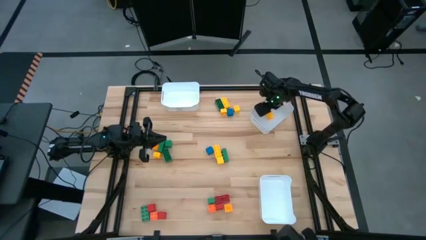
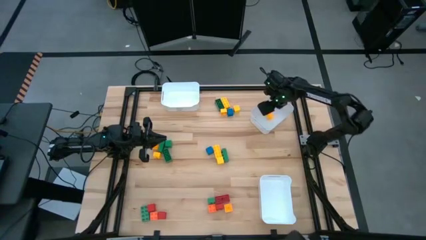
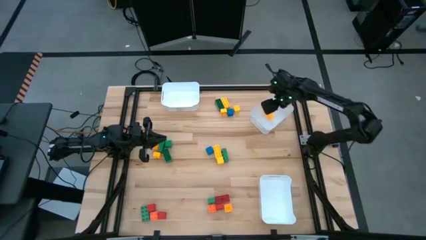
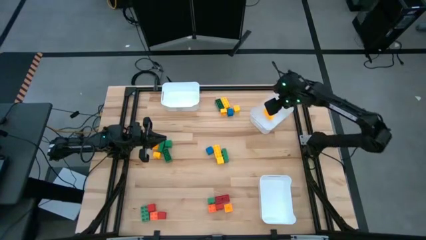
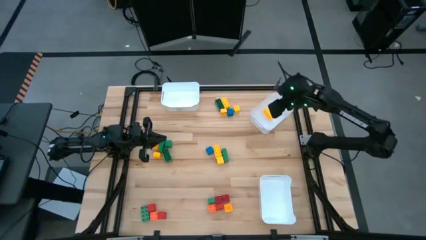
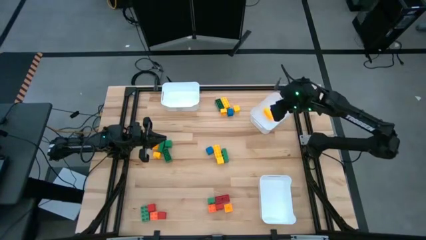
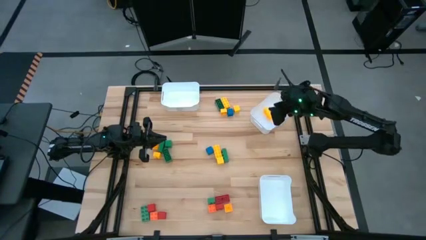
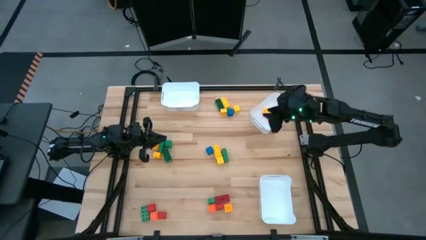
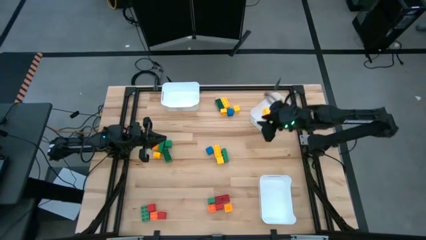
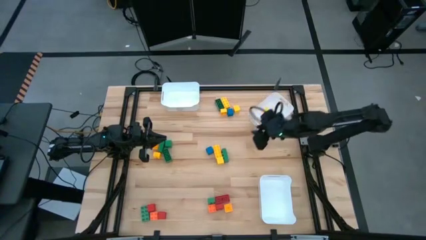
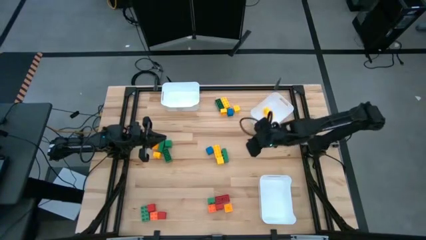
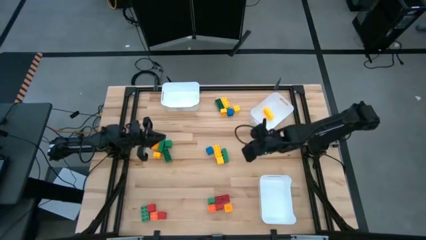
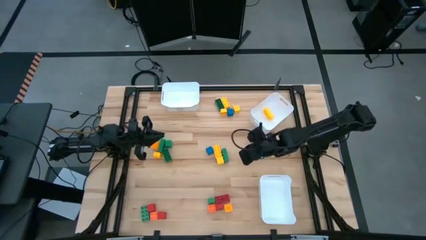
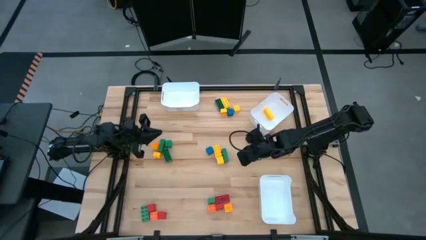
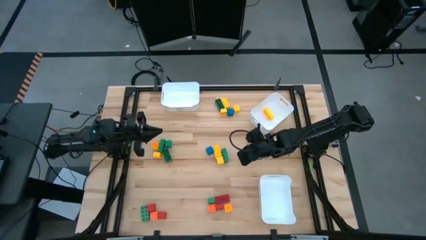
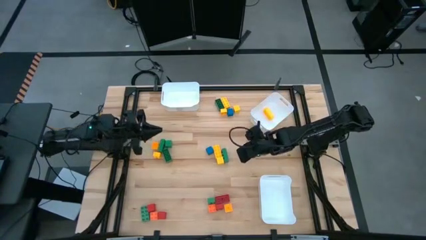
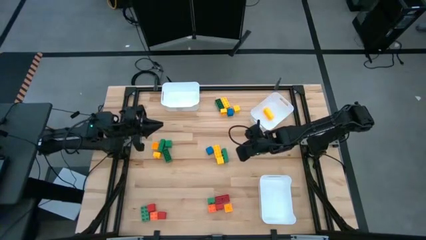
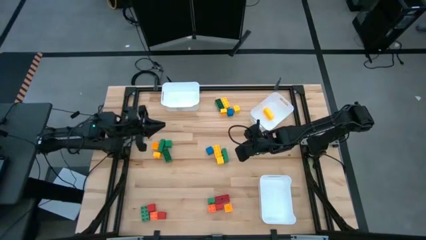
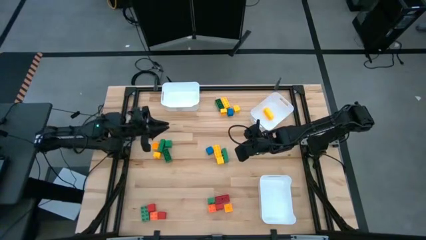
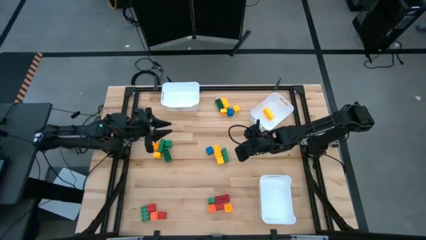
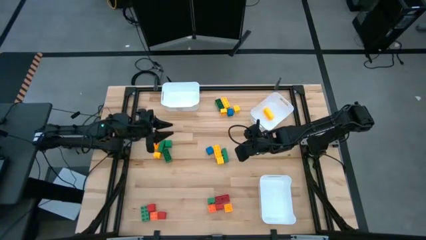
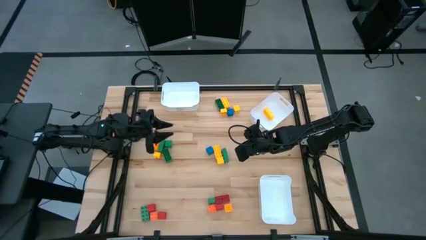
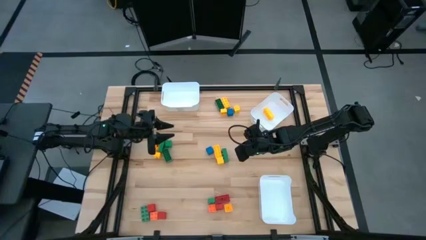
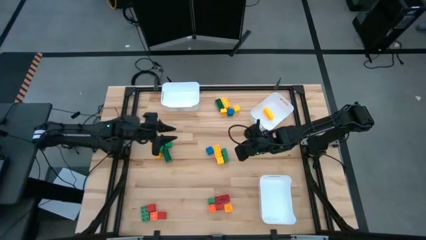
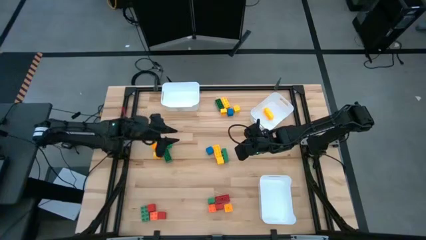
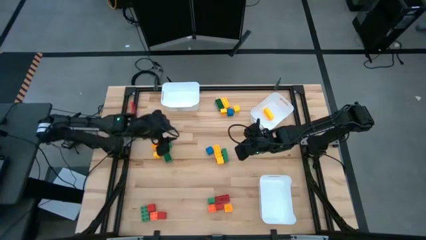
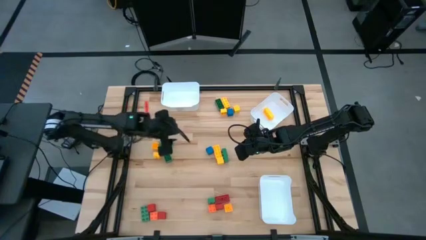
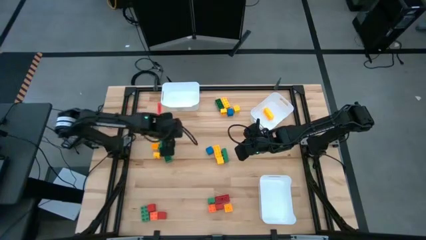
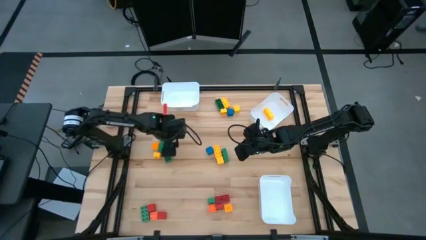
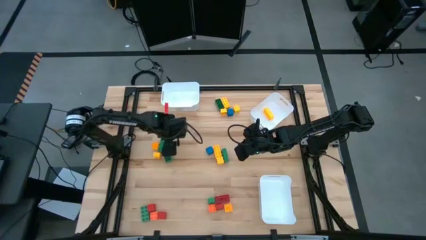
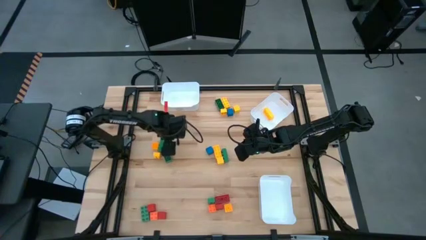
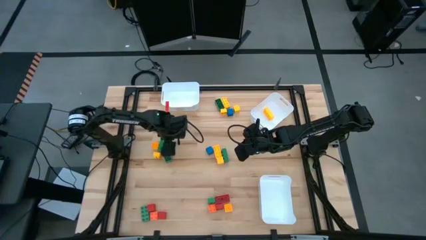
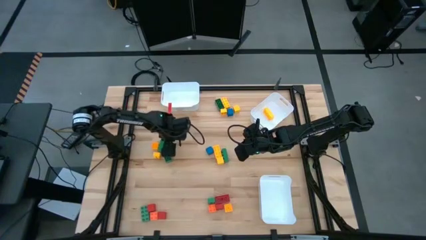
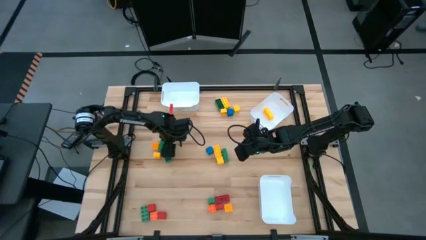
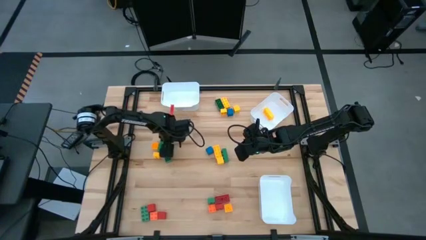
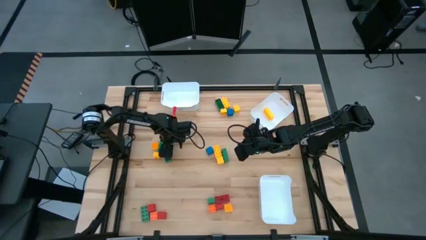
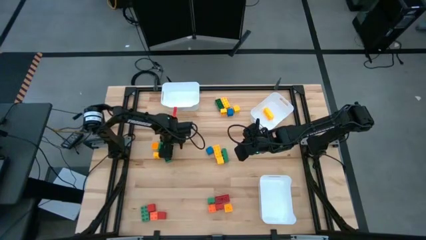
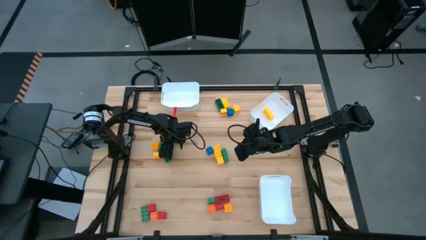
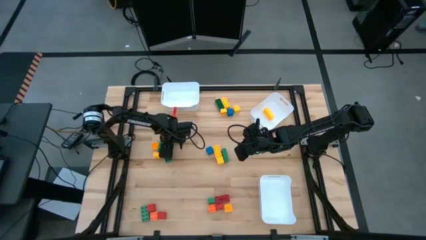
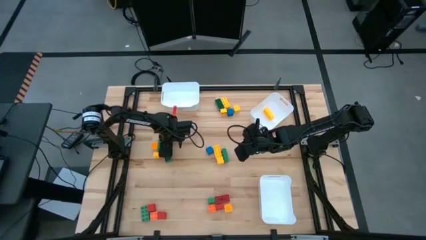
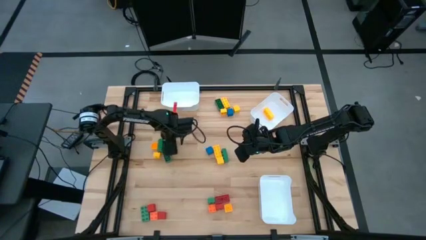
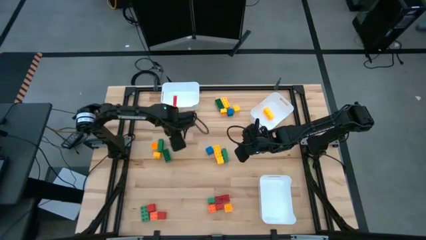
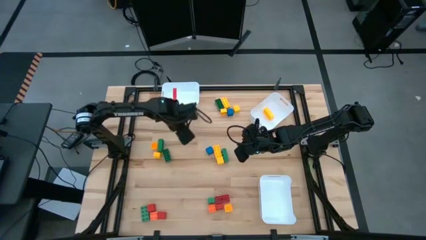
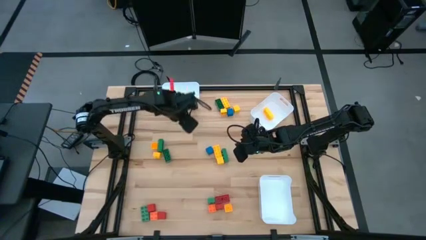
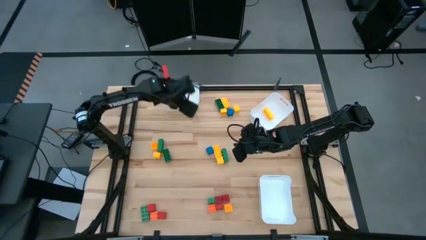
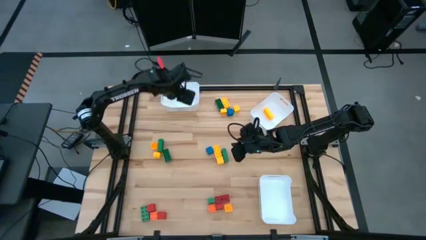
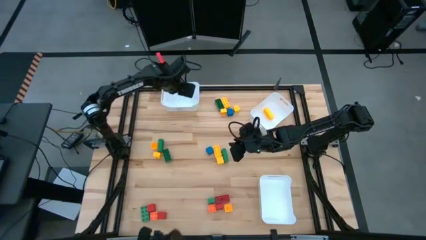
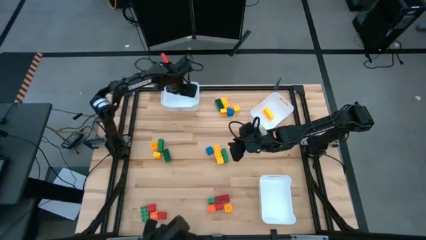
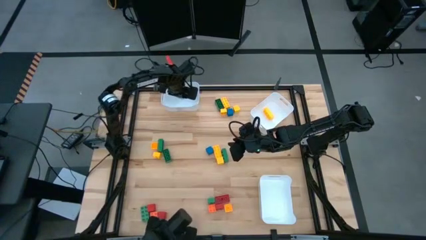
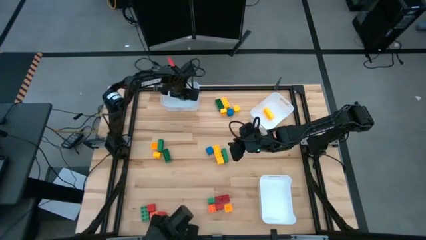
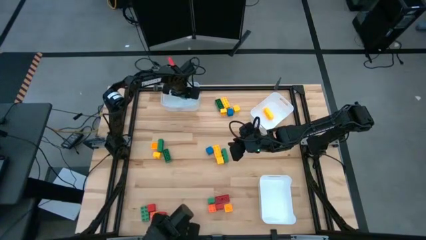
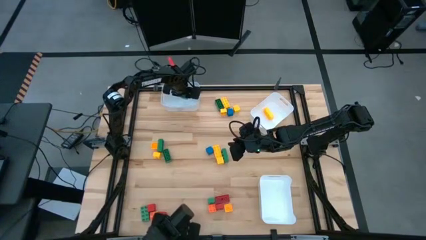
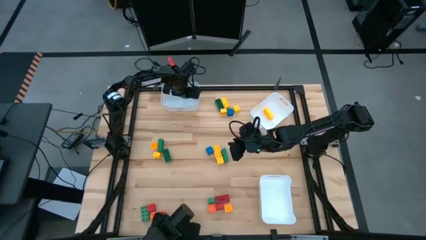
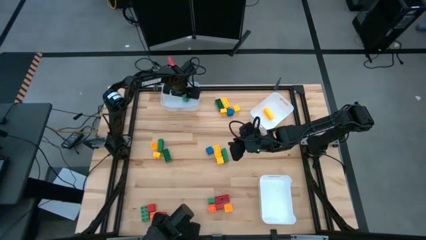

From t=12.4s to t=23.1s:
Task: Sort blocks by size
Put the green square block into the top left white bin
